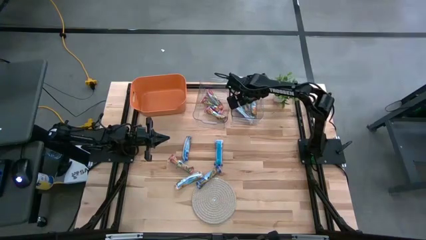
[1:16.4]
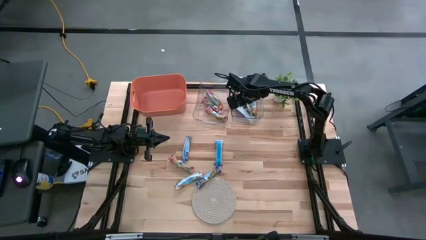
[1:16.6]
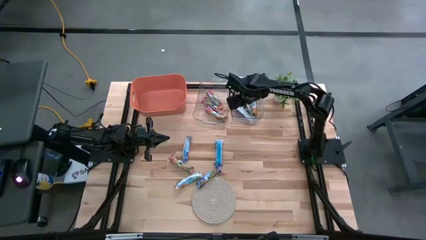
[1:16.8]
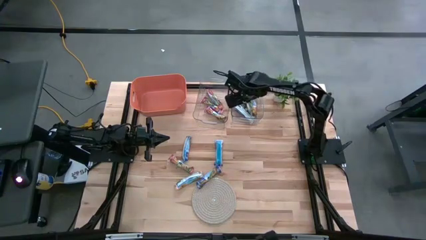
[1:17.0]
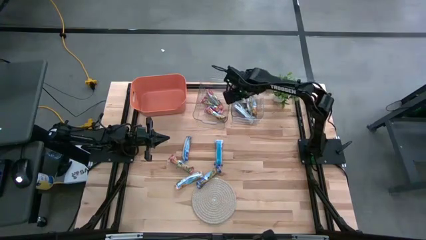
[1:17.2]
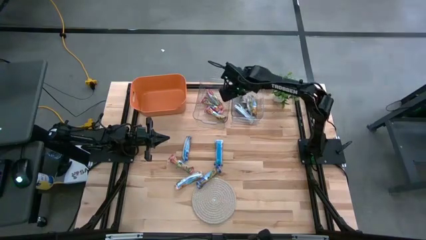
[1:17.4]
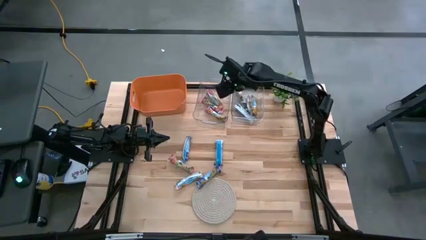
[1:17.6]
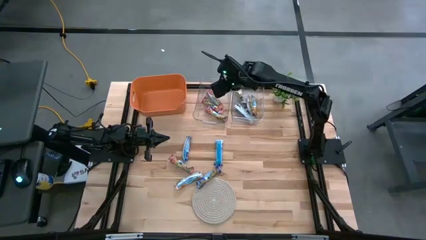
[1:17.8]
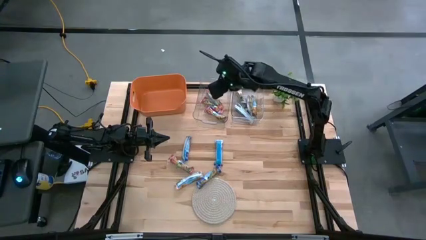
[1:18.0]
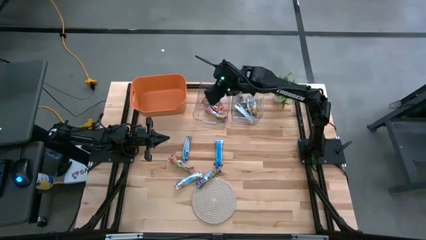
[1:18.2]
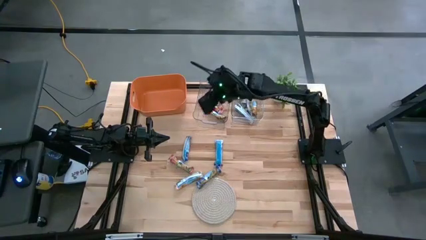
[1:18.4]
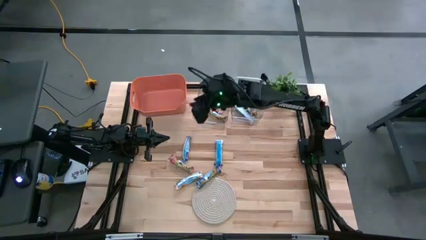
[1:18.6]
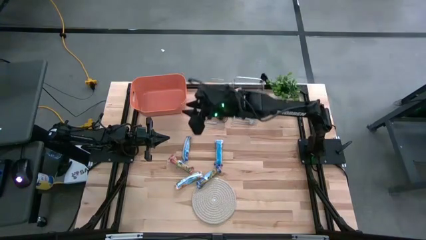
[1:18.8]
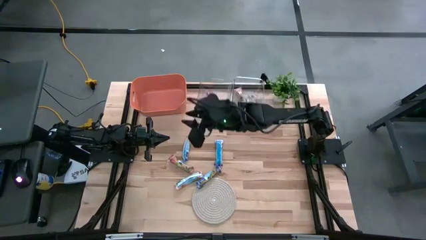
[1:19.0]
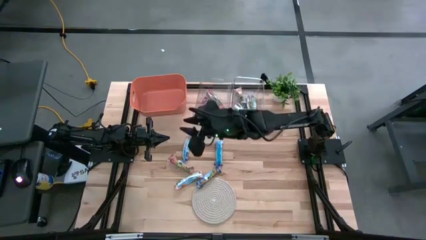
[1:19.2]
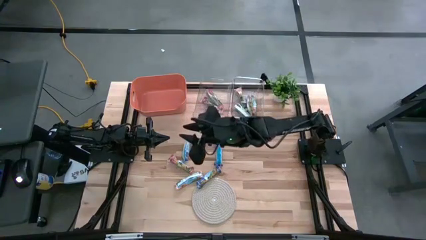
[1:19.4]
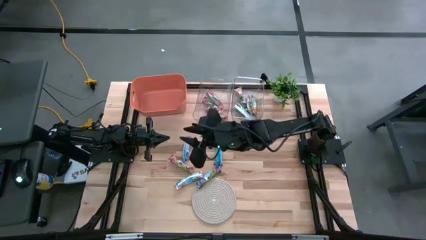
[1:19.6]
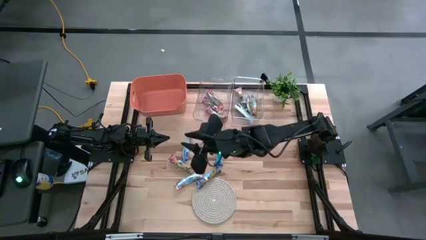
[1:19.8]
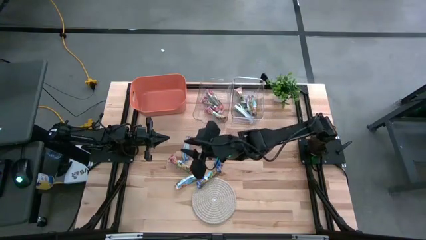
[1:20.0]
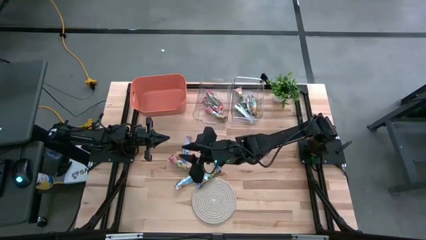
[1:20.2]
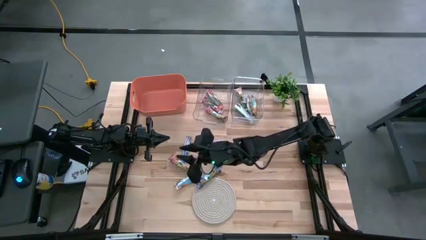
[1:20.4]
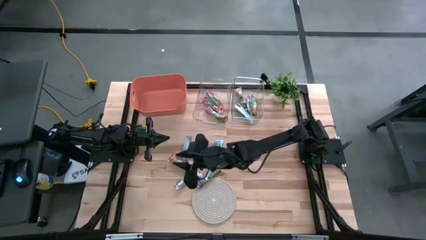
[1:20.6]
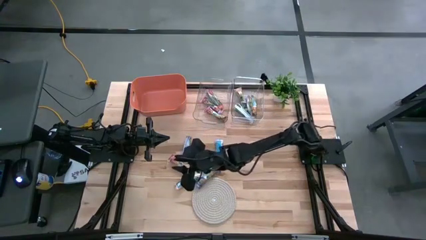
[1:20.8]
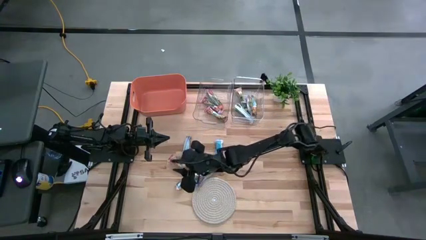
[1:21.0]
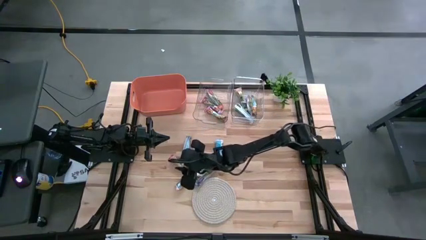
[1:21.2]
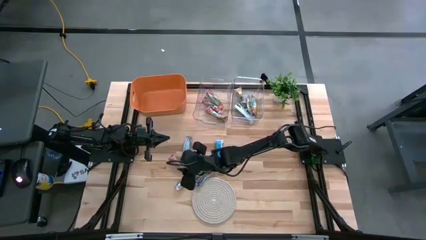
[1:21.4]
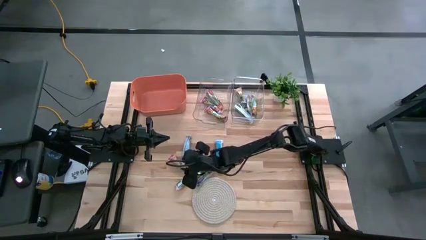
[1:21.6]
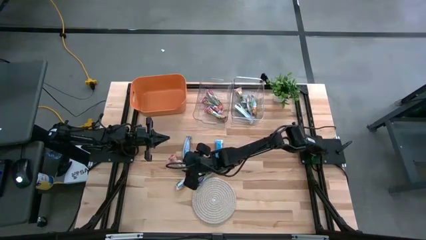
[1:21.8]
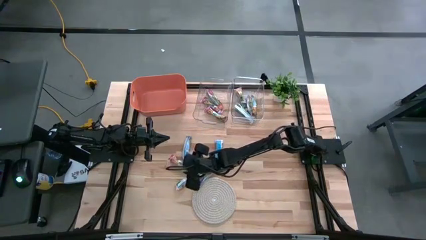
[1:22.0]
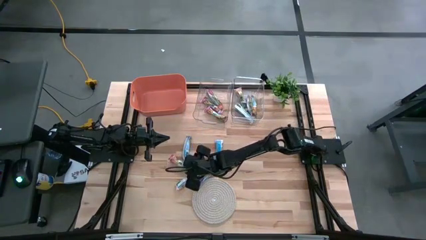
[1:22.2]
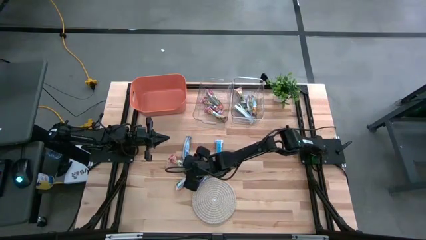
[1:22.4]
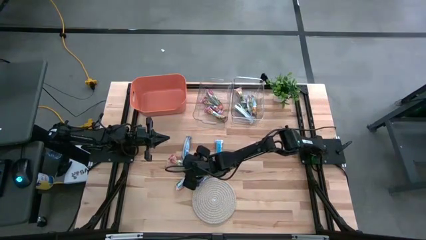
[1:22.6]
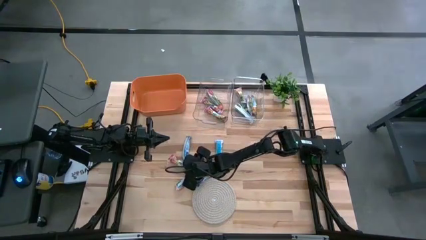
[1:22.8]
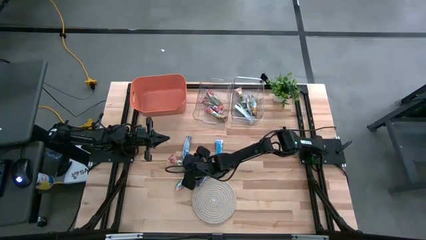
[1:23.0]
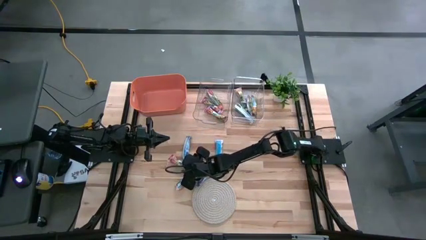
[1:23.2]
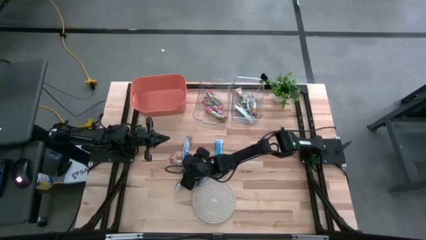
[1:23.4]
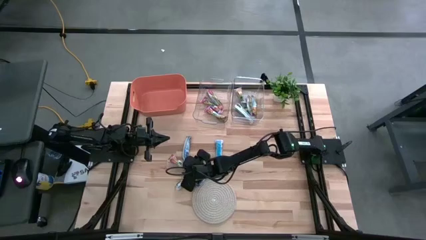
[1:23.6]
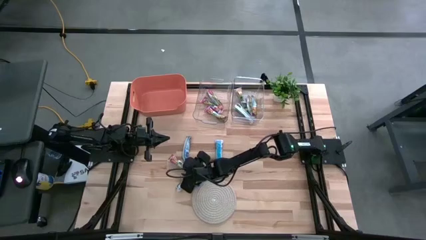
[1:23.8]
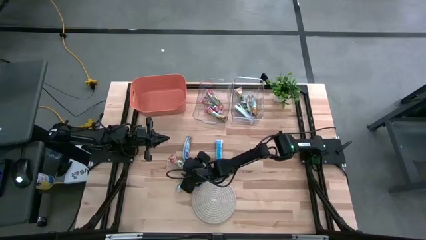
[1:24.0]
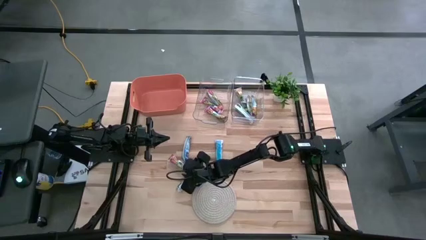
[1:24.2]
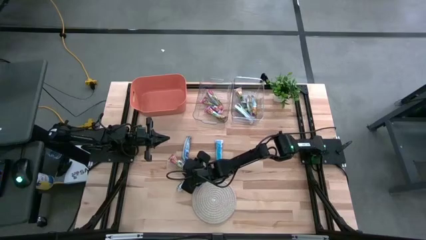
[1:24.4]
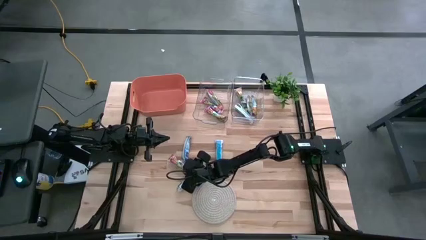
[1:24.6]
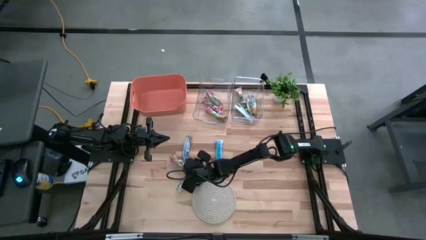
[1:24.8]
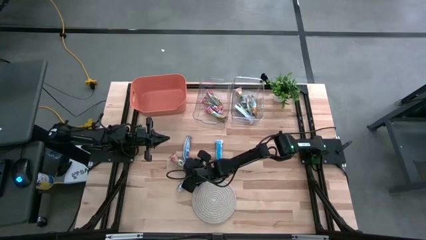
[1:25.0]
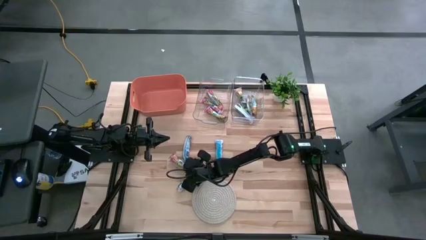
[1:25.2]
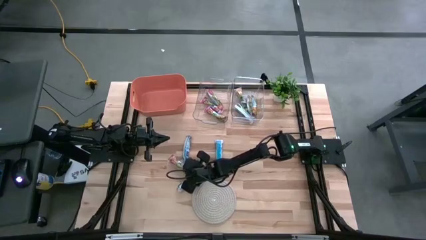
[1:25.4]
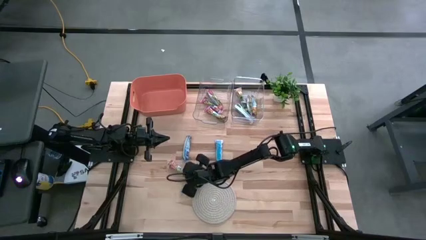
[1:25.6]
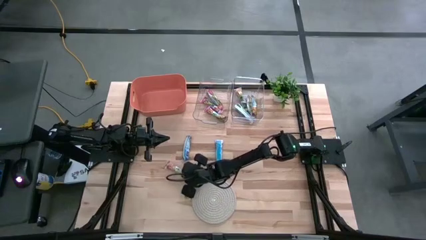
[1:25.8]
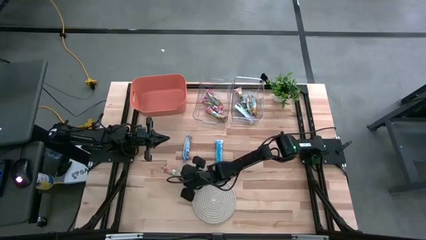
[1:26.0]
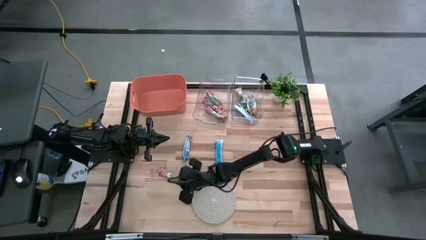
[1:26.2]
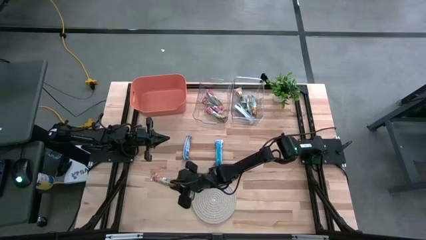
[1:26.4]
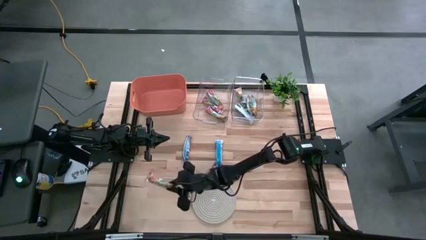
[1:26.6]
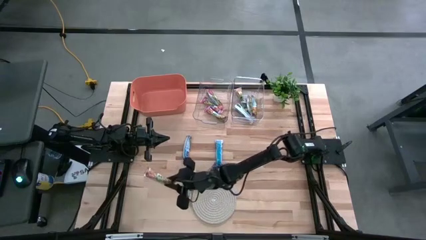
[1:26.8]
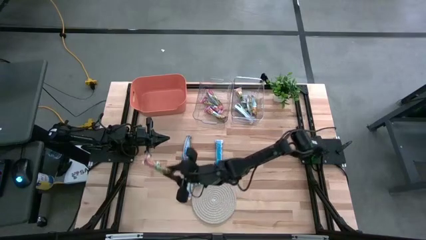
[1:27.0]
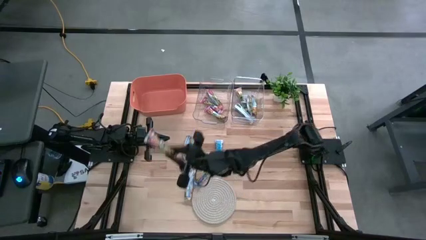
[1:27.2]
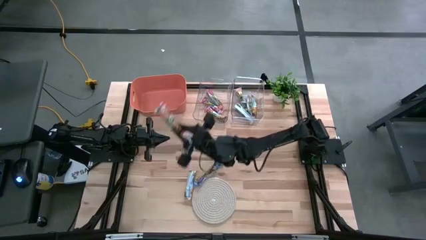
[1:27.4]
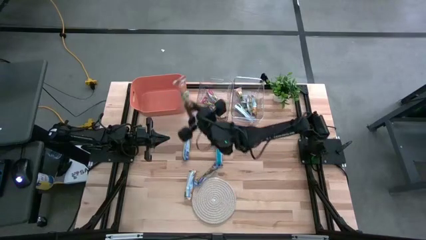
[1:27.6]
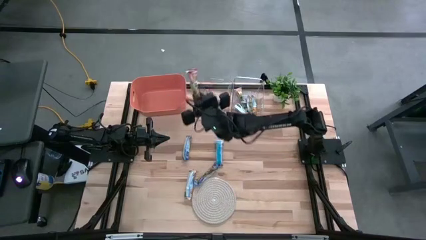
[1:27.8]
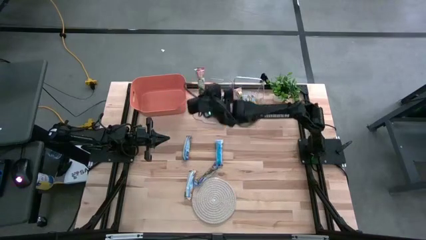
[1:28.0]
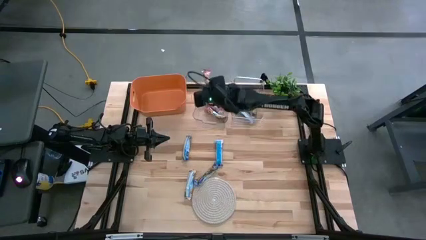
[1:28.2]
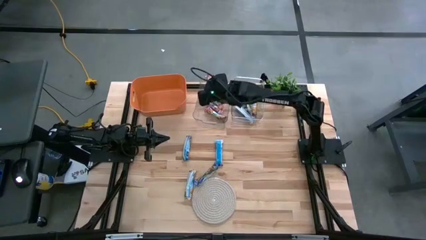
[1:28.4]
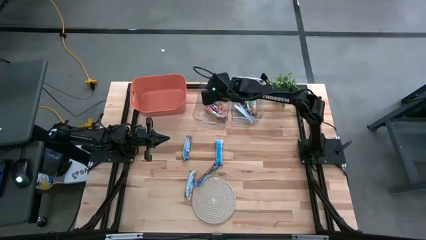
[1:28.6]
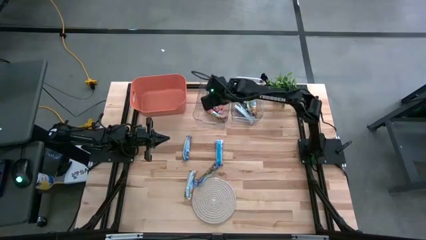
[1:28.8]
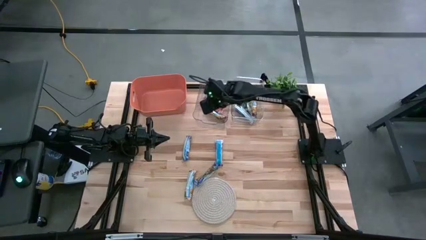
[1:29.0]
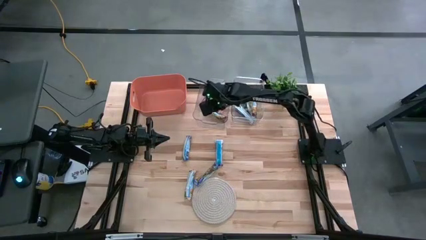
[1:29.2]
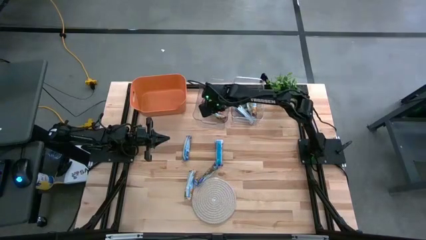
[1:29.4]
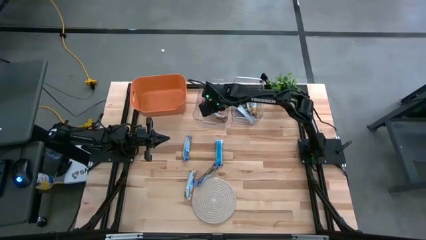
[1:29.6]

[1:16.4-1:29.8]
Task: Pick and place Granola Bars by type
Put the red granola bar into the left transparent bin
